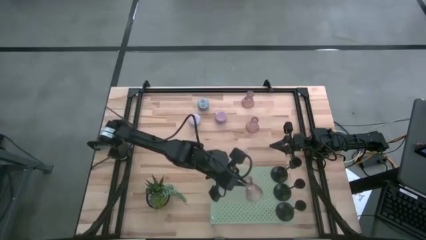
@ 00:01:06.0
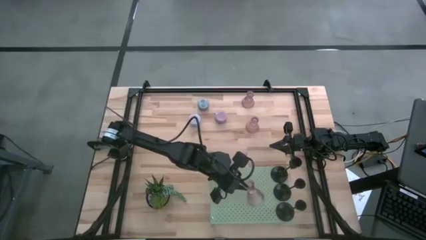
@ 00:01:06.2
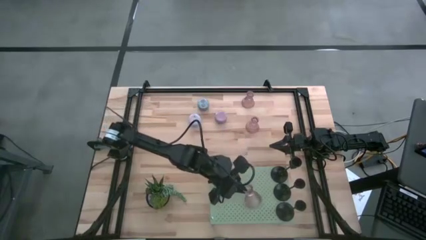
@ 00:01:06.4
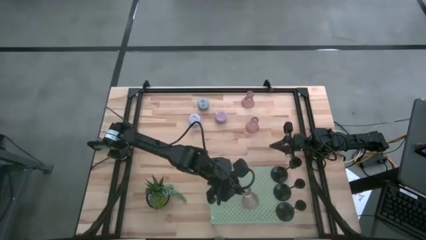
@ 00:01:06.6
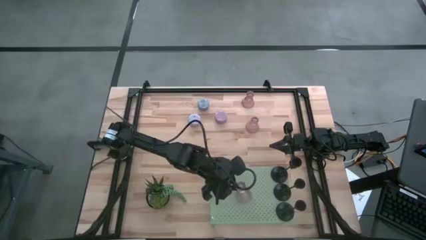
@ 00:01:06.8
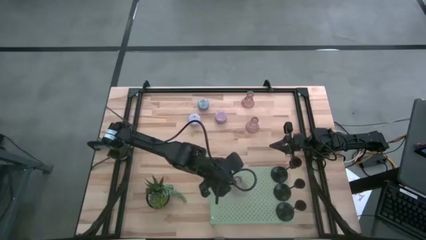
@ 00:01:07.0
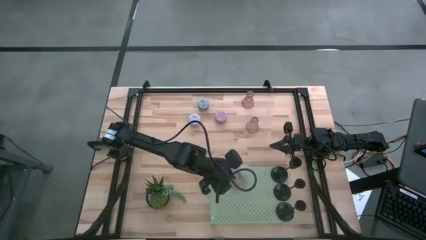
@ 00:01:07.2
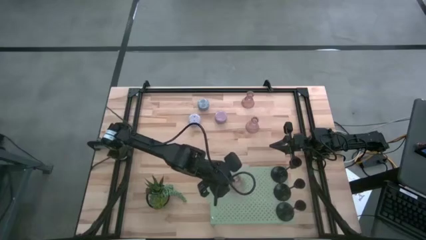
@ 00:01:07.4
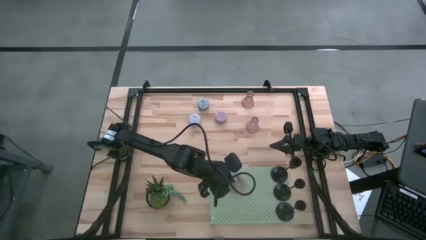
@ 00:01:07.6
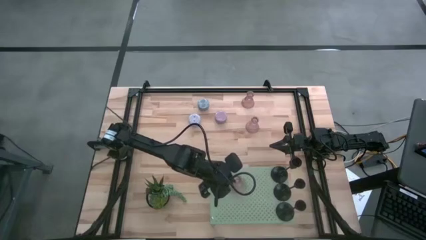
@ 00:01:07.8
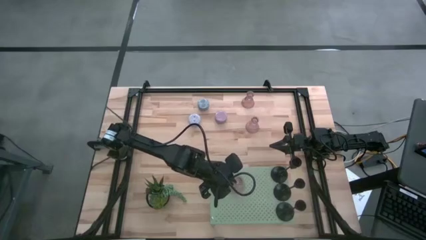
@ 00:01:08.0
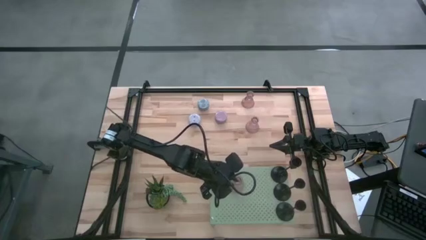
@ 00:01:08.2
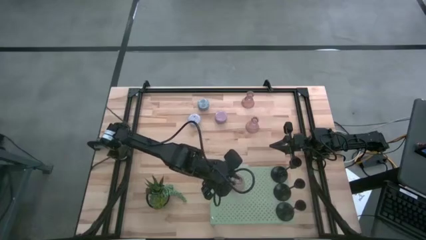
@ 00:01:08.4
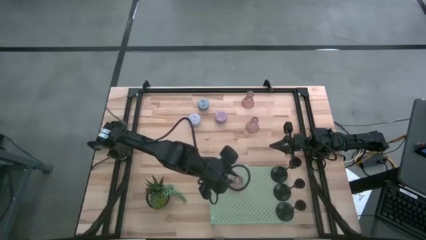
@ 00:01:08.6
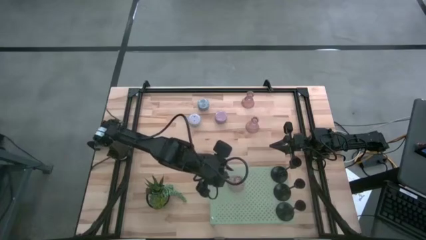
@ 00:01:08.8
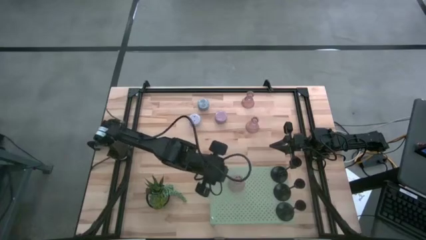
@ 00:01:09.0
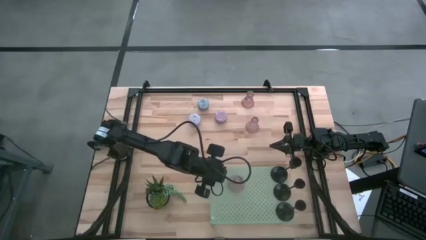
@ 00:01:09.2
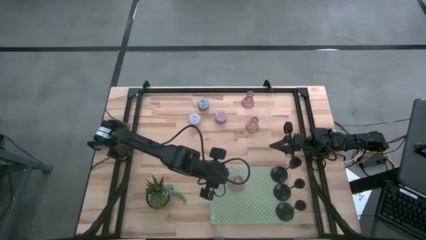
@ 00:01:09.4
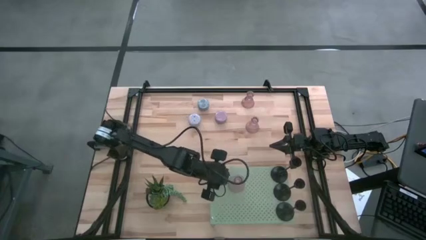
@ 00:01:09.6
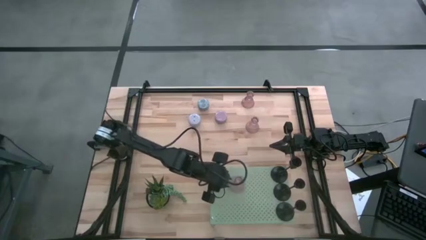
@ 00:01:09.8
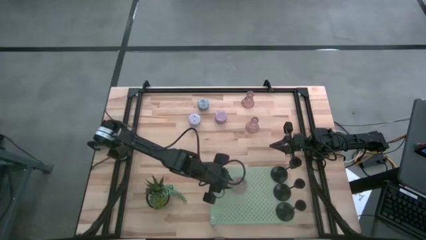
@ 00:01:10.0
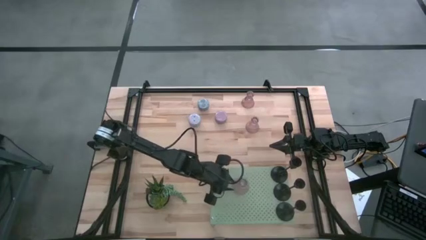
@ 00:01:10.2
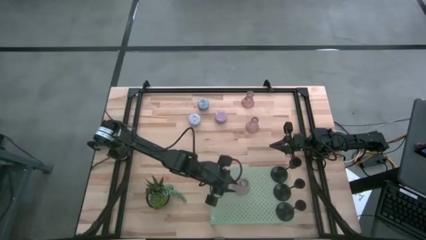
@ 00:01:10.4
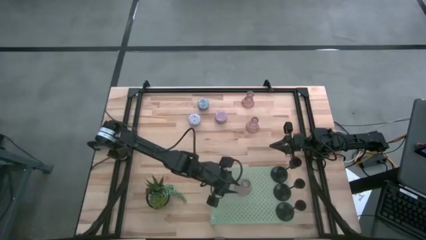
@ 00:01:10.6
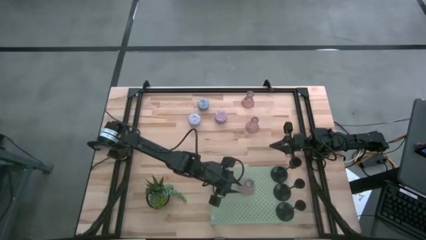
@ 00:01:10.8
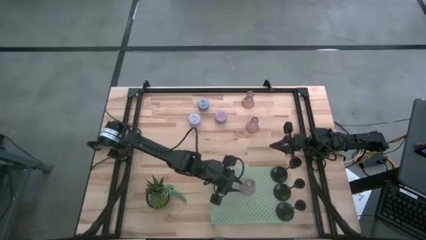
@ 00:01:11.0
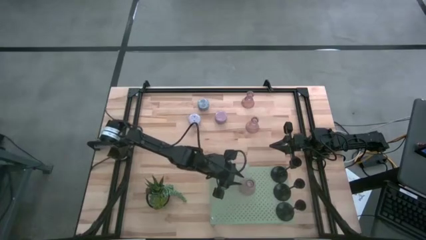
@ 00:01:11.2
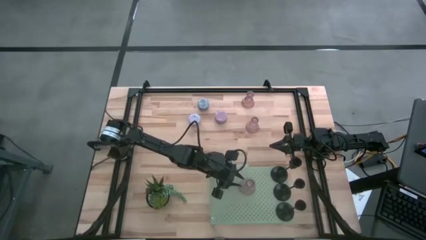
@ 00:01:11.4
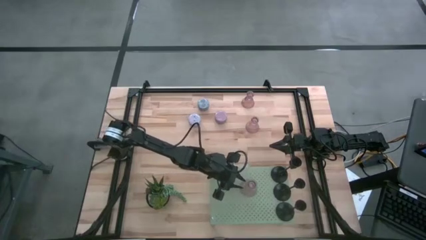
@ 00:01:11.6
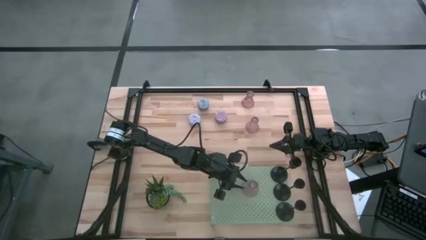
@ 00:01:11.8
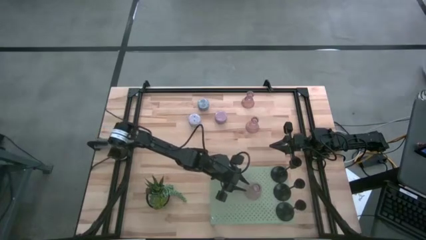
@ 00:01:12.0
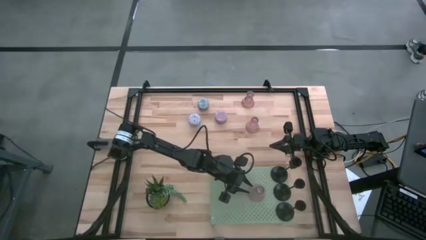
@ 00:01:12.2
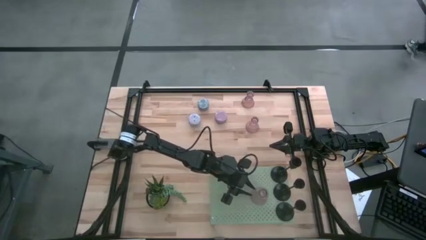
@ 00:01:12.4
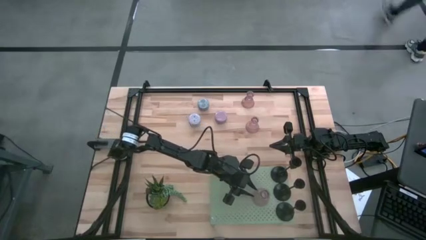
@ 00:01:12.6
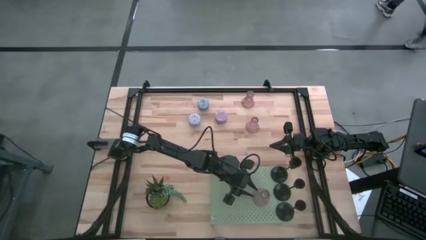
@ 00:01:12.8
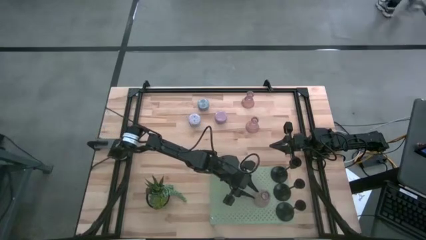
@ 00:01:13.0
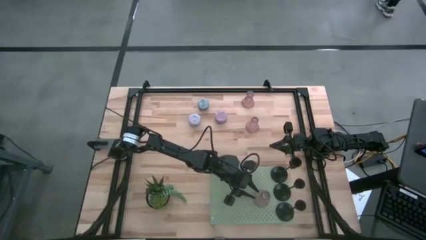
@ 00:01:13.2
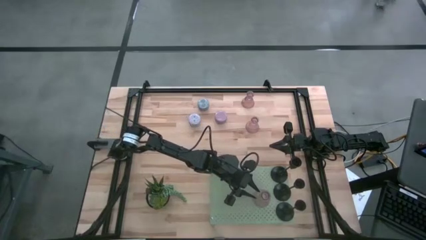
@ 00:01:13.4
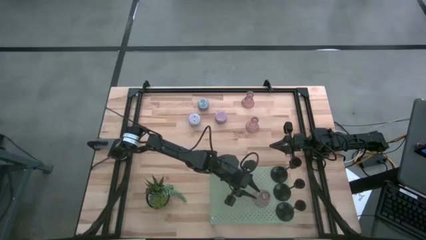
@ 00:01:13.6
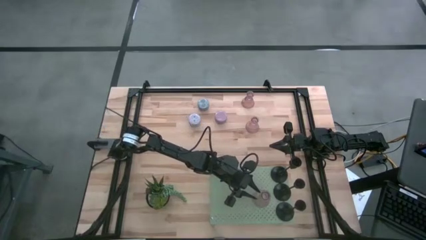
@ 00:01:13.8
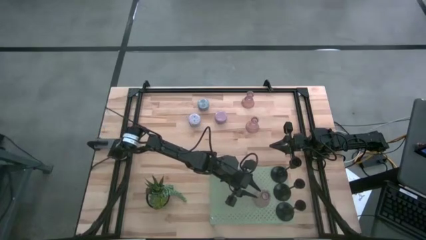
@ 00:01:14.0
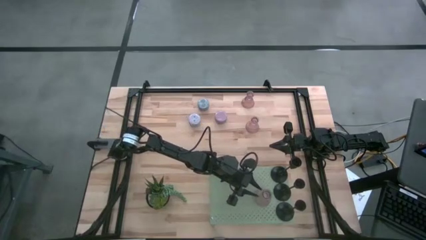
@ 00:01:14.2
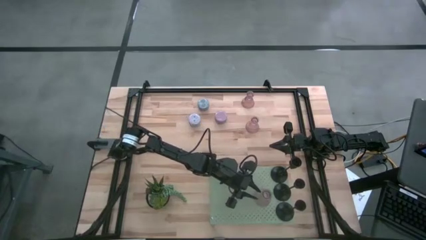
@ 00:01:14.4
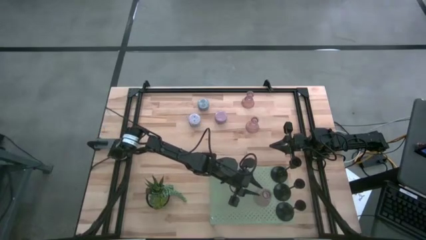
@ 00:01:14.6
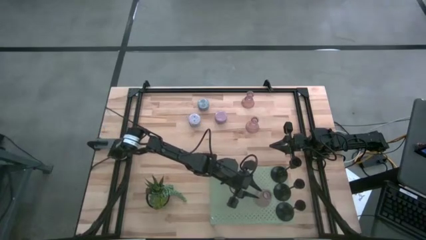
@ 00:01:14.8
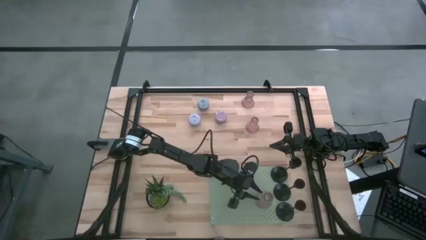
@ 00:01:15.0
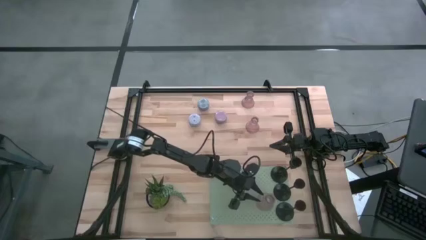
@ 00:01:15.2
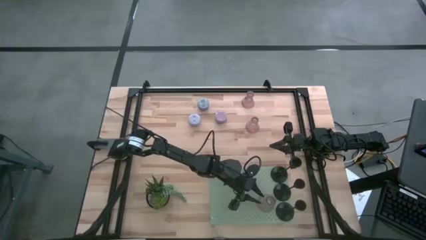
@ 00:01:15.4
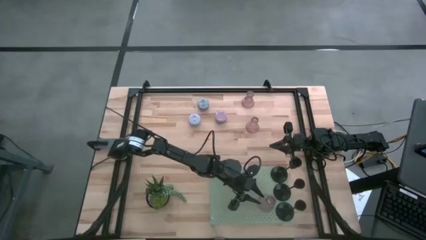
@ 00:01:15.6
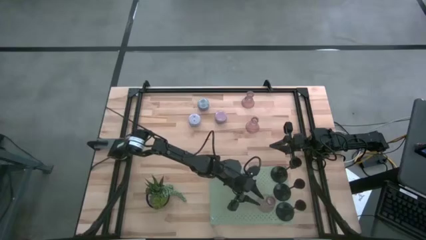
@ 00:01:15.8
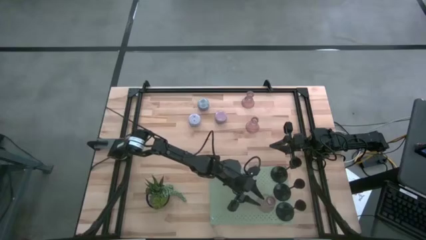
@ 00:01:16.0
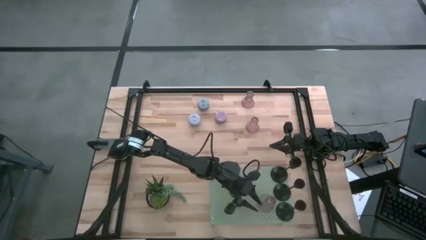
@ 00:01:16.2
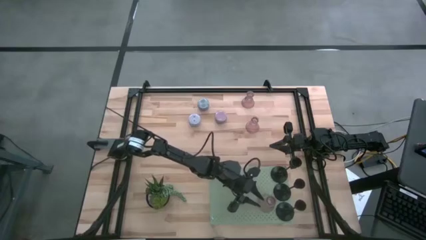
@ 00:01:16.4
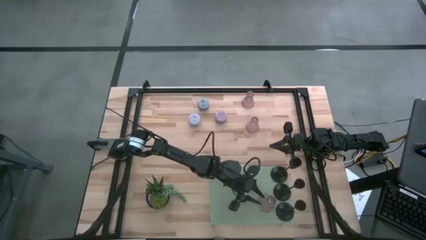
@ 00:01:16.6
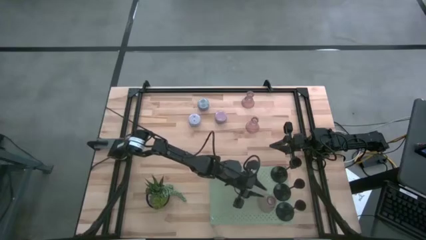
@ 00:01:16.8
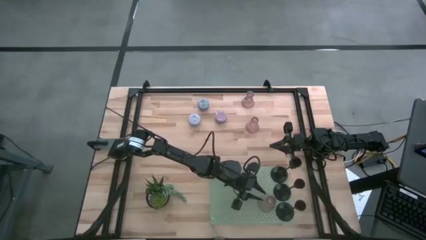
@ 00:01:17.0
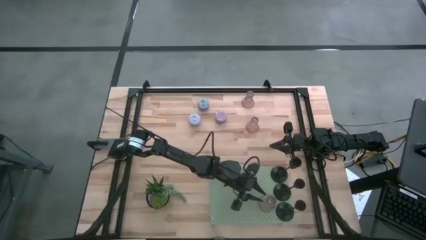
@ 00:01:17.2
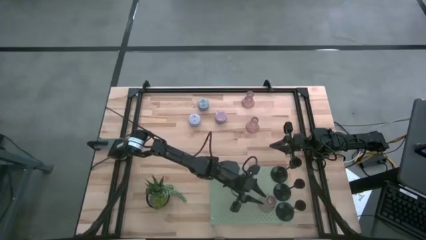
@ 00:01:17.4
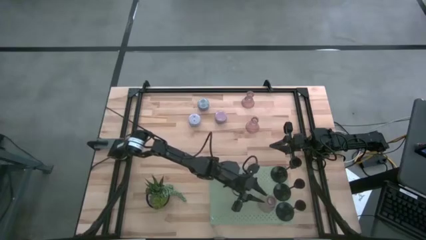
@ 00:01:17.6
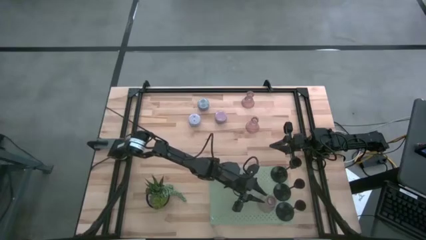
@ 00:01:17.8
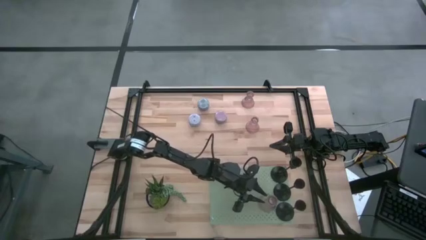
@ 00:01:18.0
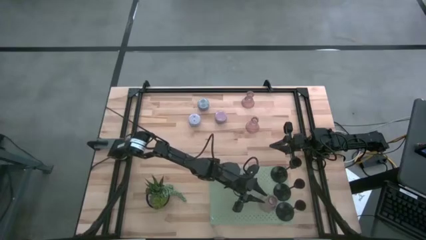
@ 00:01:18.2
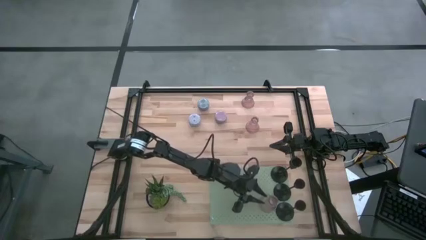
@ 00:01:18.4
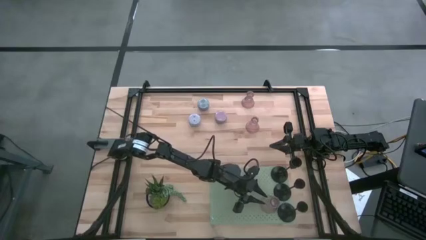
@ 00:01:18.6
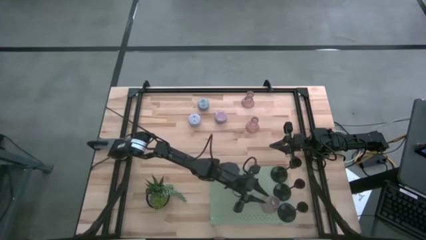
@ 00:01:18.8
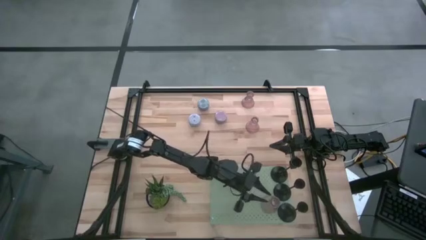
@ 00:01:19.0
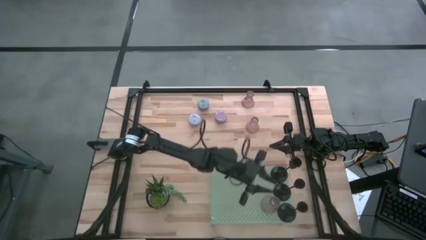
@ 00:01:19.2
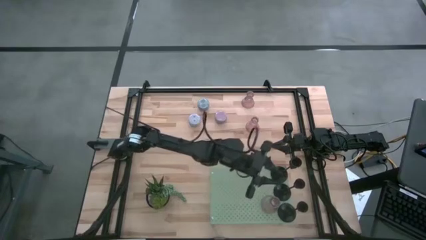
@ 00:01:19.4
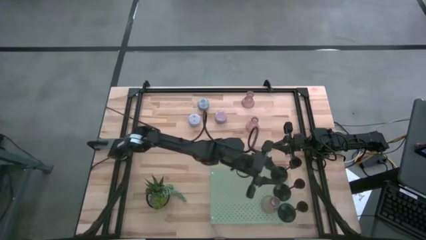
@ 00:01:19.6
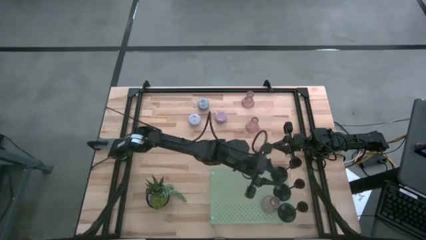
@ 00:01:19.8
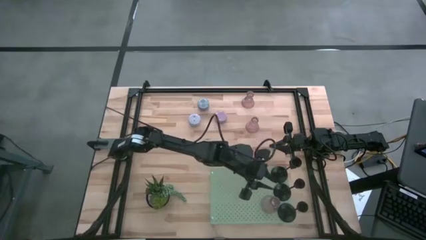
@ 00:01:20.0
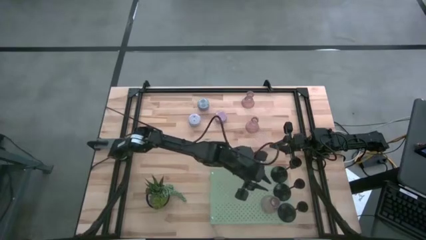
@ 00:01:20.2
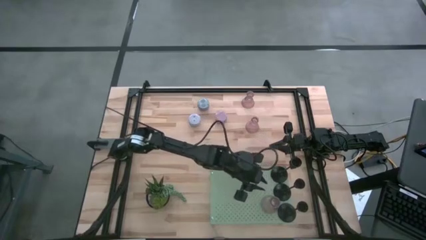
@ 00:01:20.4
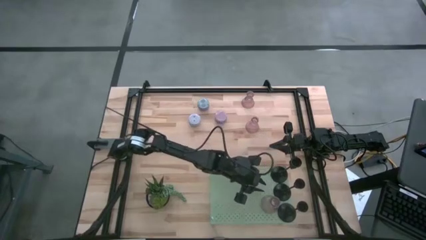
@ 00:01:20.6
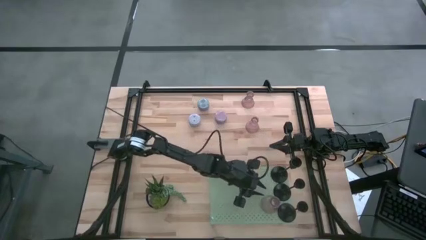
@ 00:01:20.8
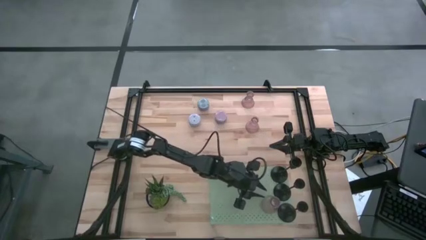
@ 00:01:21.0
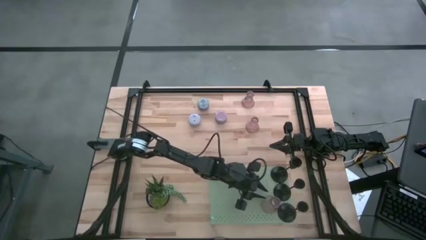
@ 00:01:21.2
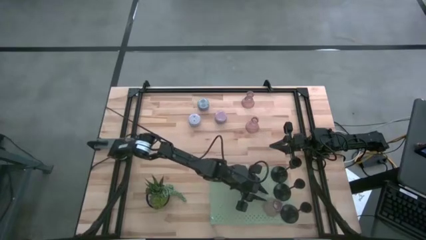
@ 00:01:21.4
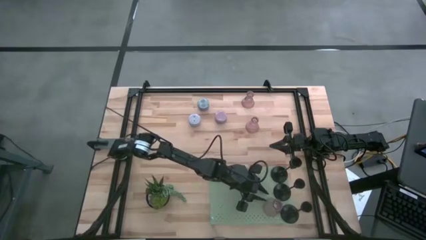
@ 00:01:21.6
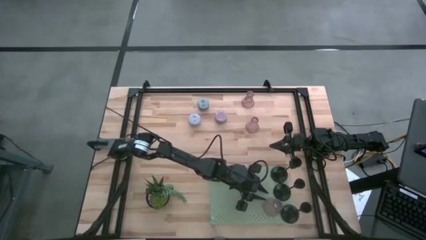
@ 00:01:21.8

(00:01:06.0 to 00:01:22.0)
Task: Pick & Place candle stick holders
Put the middle pink glass candle holder on the shelf

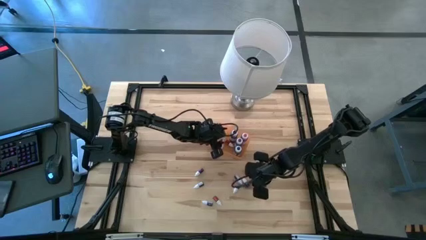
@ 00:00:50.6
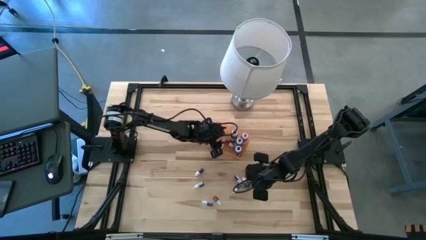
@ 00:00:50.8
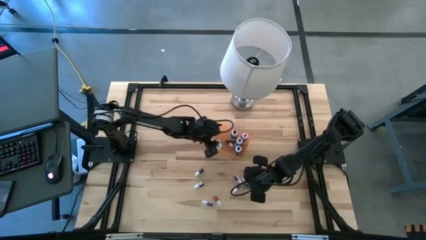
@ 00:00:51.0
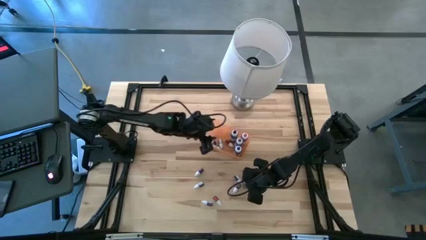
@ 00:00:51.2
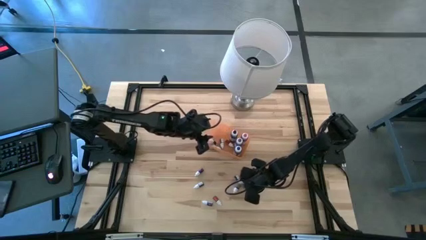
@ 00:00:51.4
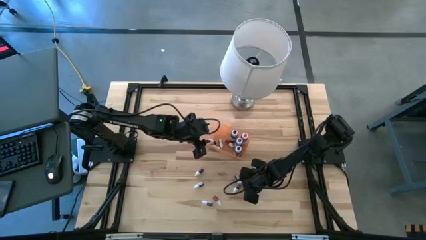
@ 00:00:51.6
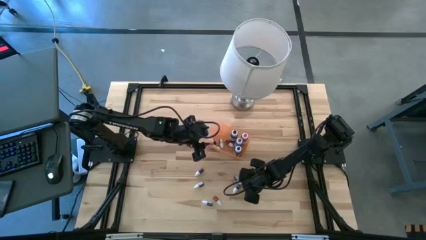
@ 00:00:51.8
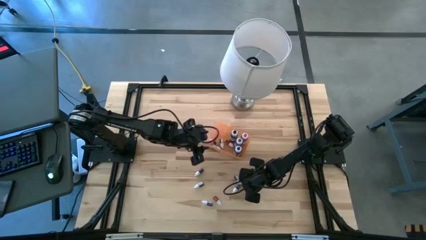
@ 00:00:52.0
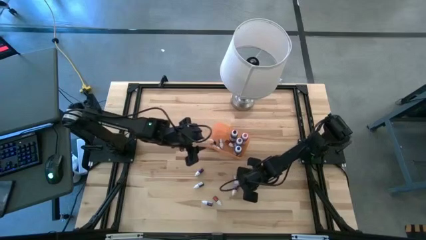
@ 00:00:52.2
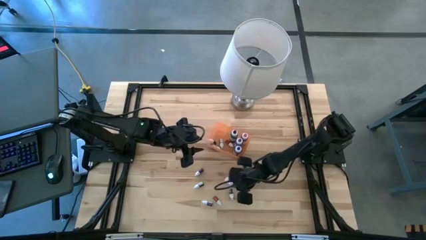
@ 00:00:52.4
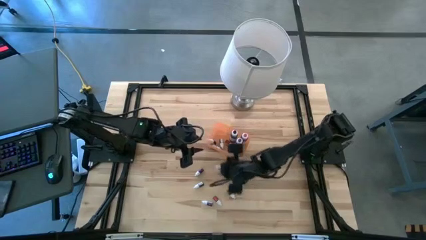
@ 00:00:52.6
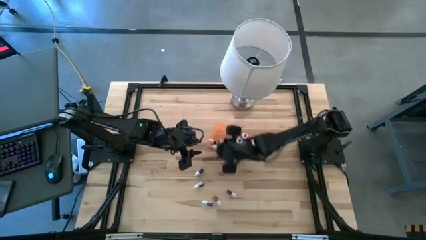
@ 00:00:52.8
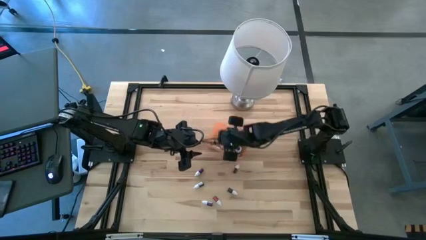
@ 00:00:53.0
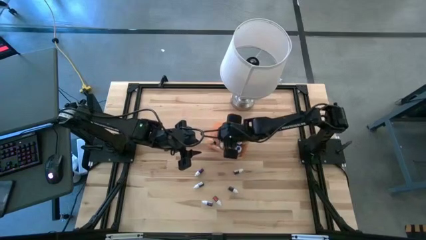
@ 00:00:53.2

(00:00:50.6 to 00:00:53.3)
Task: Pick & Place food coloring
Put the small purple food coloring bottle into the orange bin
